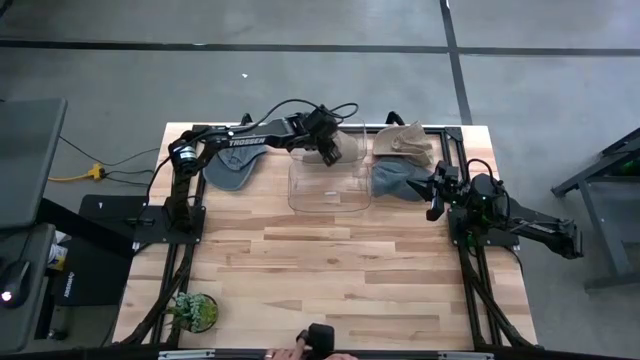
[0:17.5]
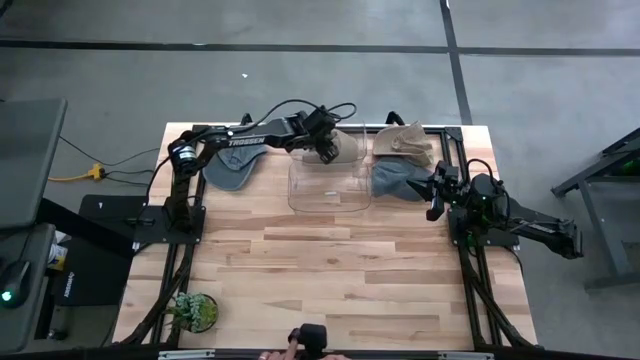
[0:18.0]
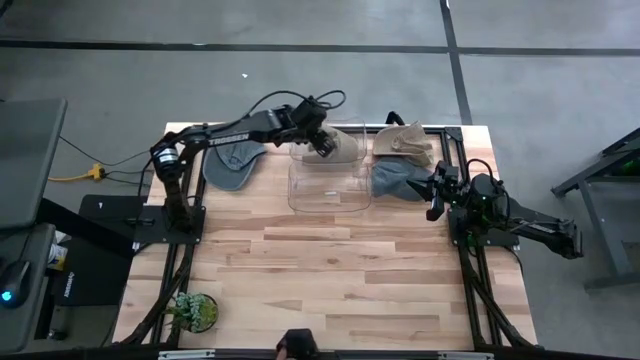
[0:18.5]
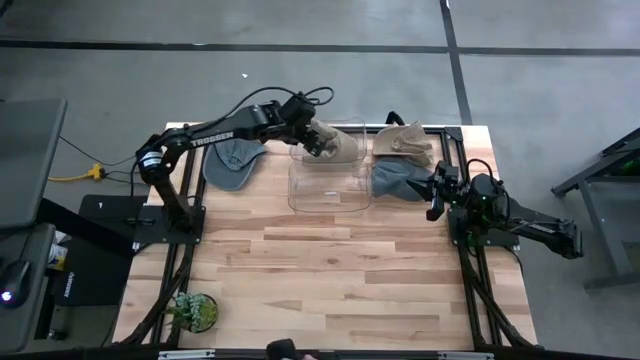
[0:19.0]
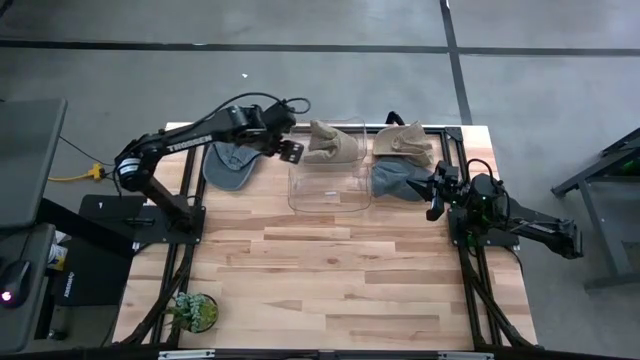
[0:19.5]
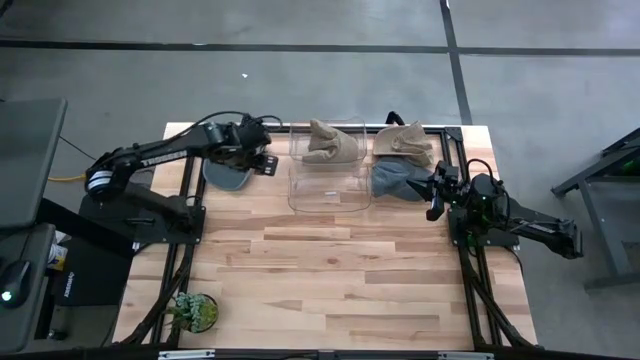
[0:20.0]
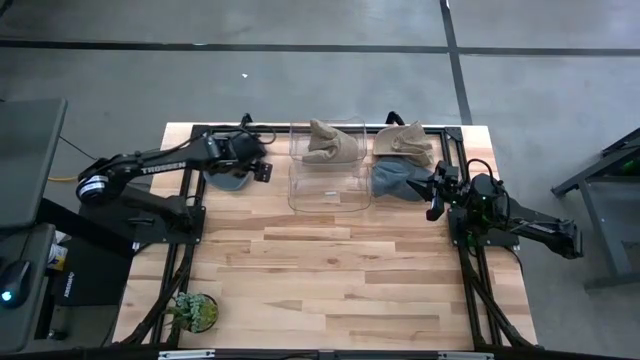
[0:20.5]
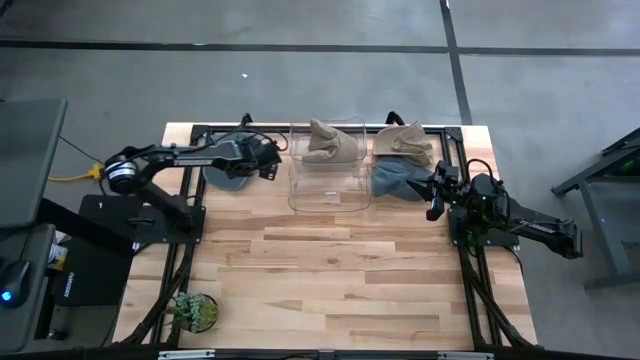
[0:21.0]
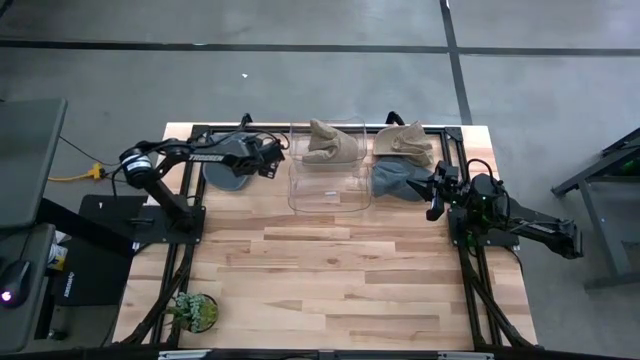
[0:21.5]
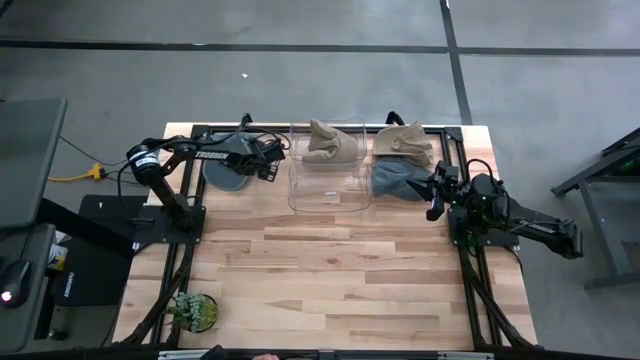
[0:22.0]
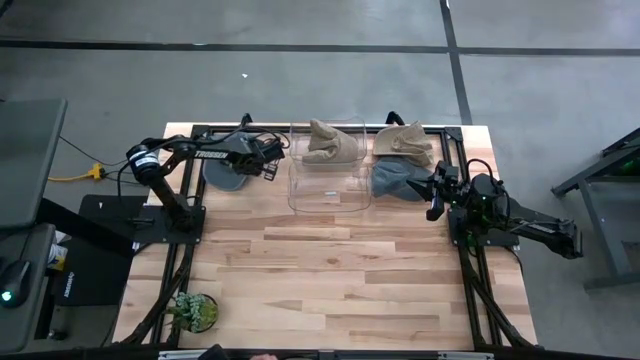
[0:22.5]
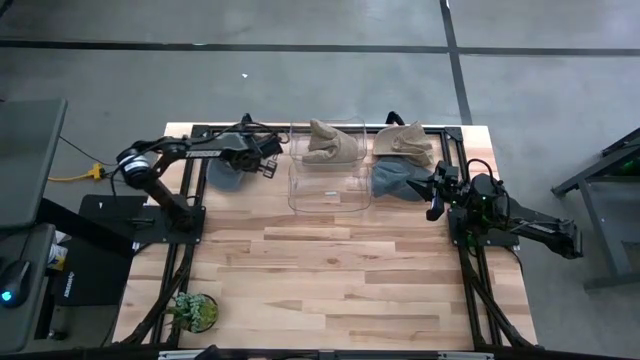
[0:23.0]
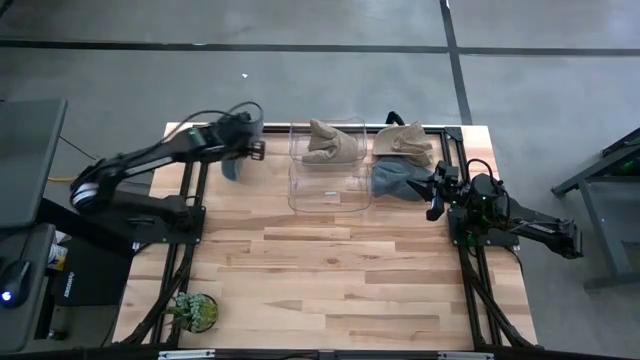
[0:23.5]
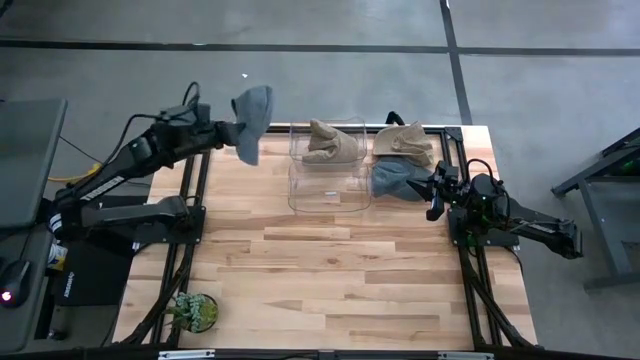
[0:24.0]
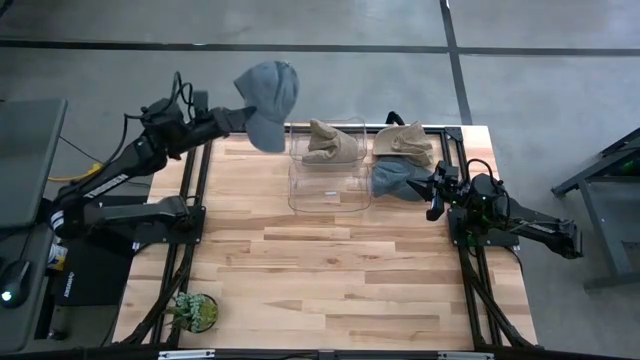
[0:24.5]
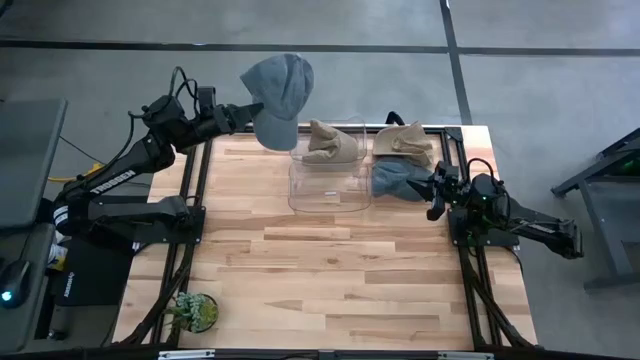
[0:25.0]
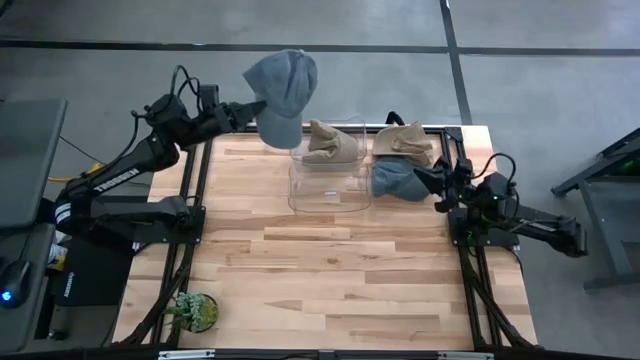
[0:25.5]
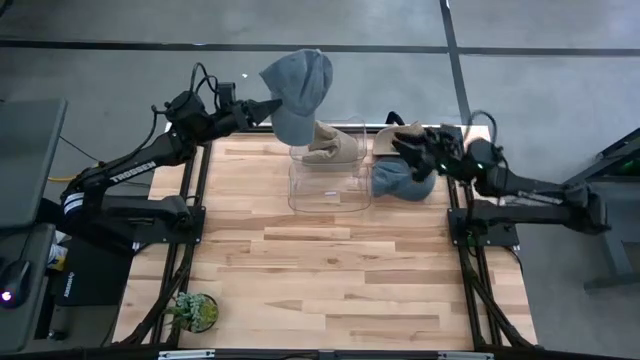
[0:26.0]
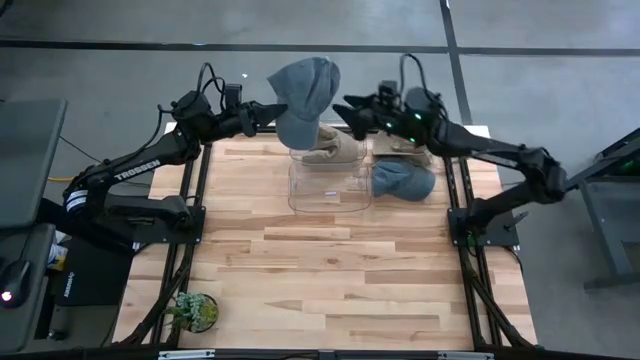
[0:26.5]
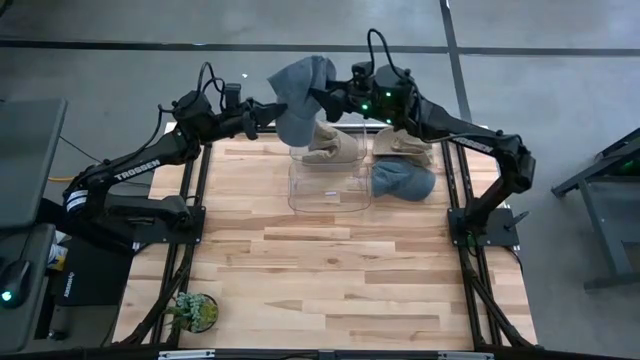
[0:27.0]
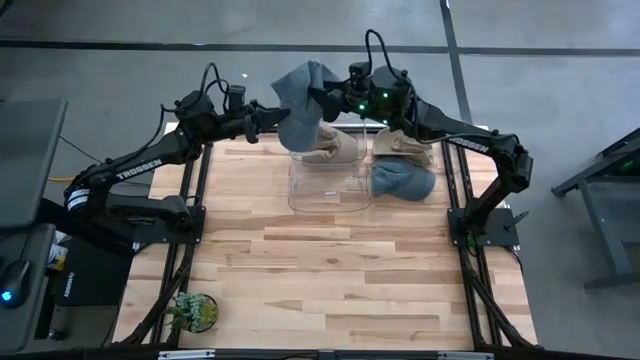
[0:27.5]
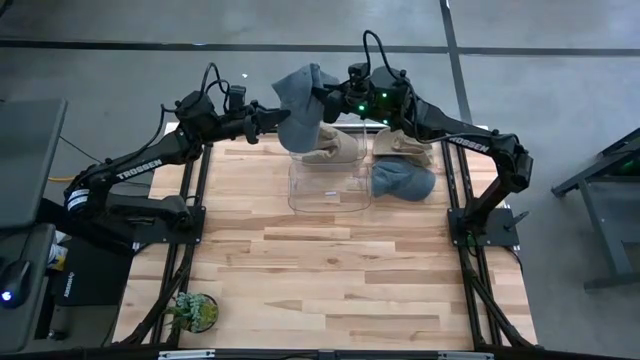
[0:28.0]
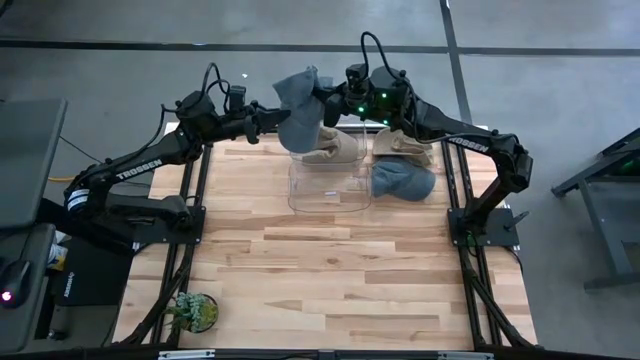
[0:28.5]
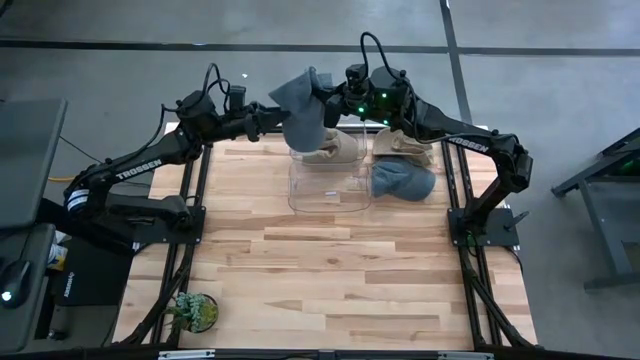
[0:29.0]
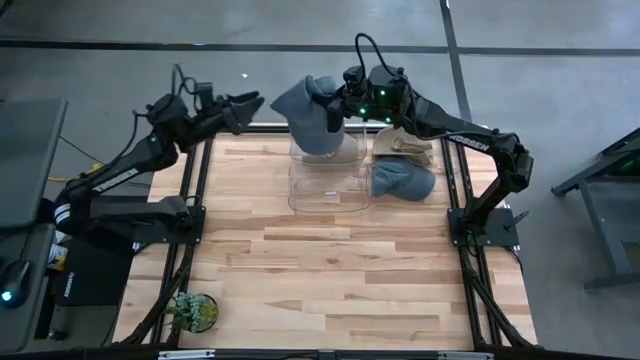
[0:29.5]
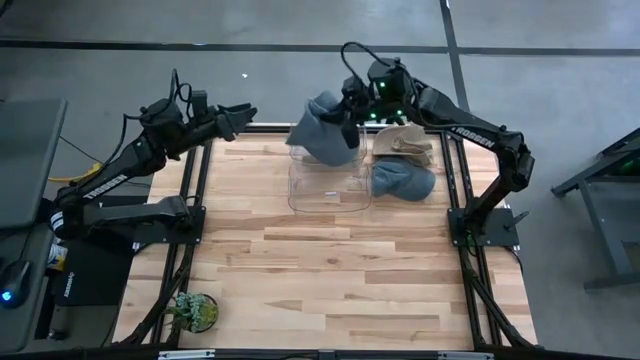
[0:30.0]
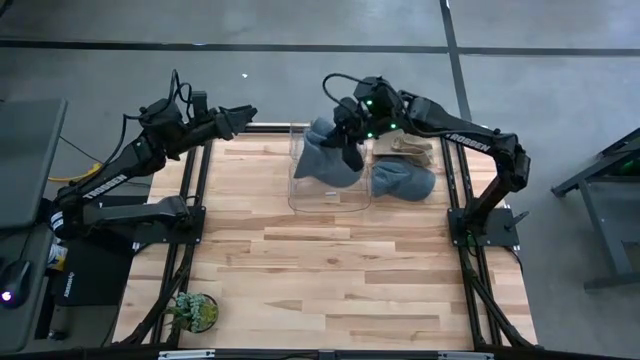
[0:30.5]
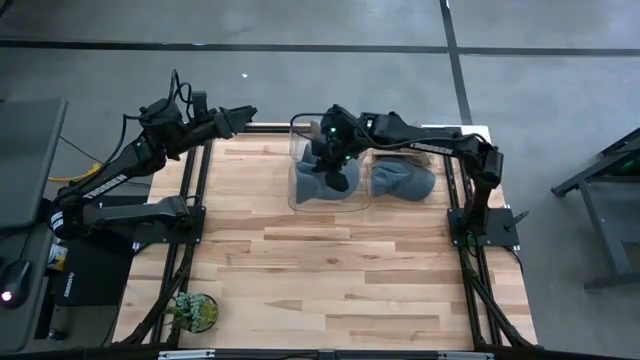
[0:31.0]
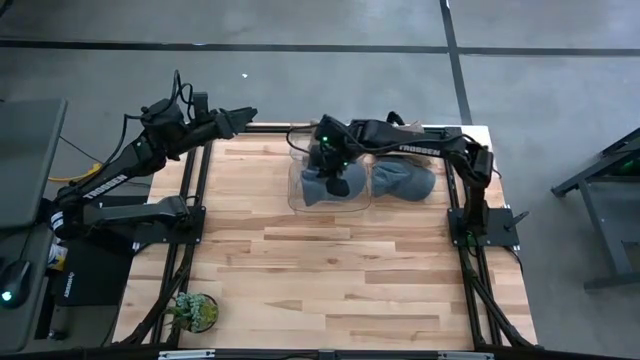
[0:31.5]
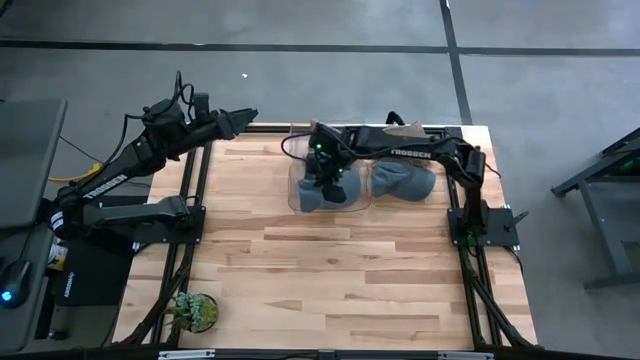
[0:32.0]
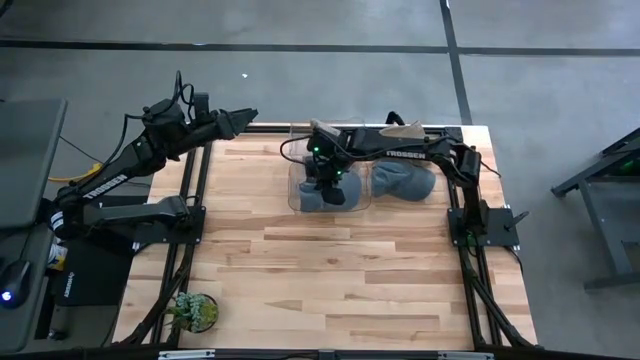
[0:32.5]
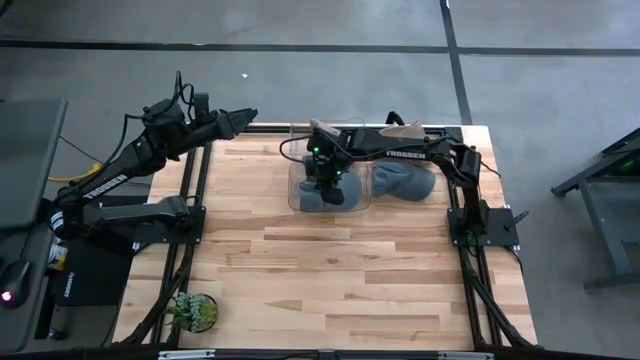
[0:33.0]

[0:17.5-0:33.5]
Task: Pick & Place hat
Put the left blue cap into the bottom transparent bin

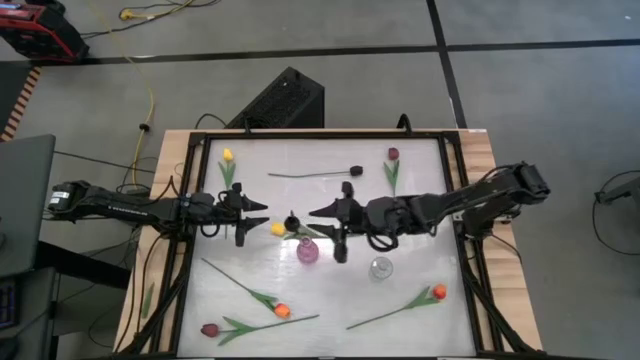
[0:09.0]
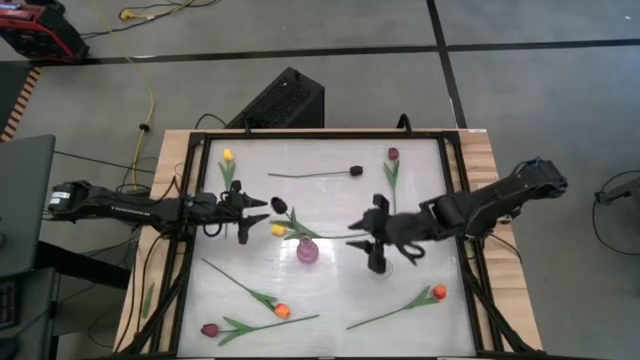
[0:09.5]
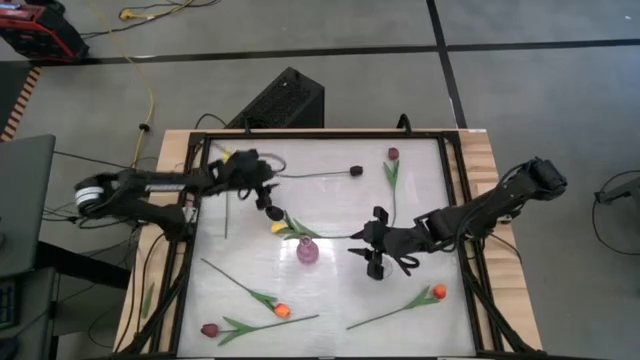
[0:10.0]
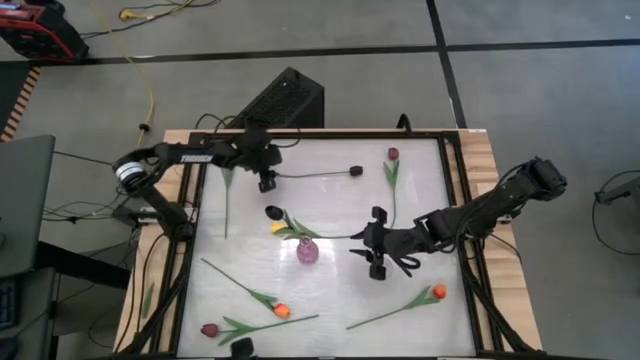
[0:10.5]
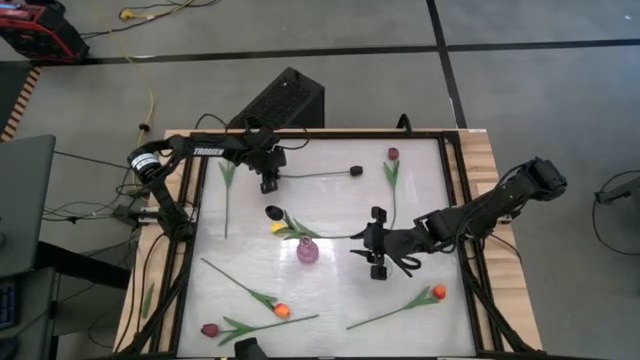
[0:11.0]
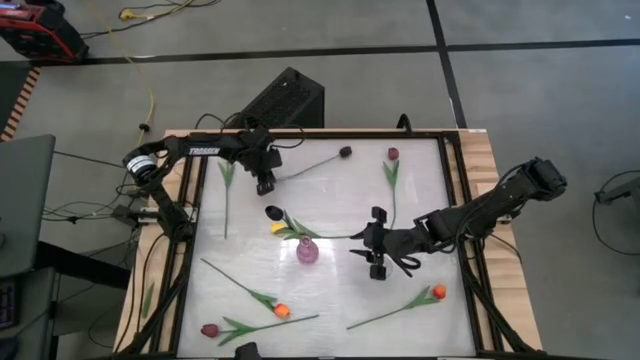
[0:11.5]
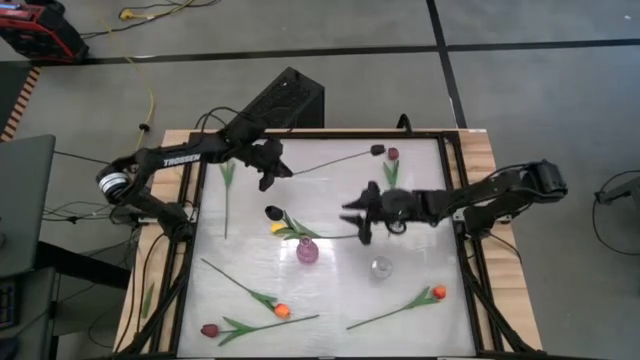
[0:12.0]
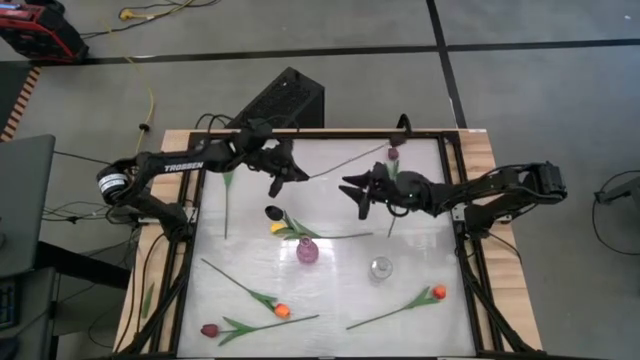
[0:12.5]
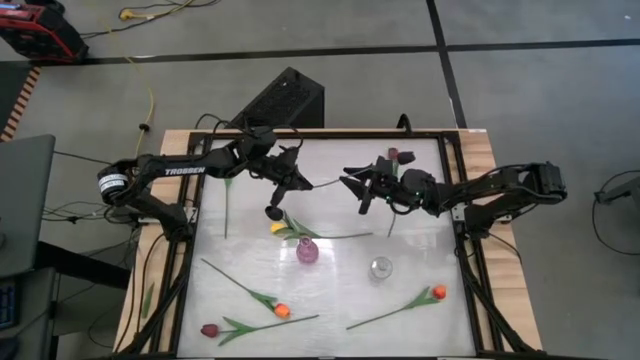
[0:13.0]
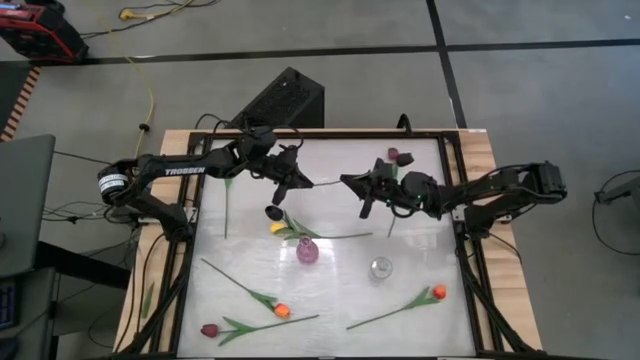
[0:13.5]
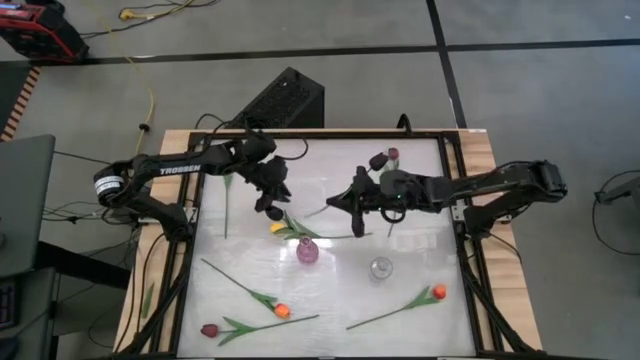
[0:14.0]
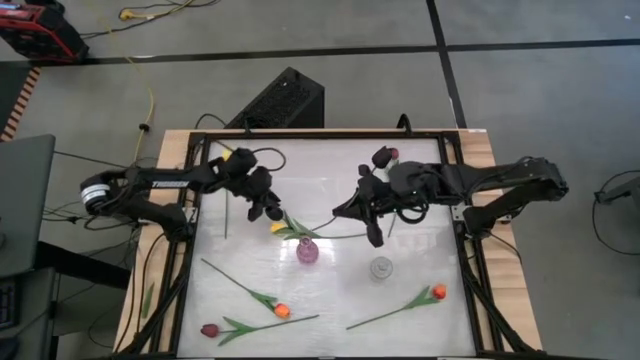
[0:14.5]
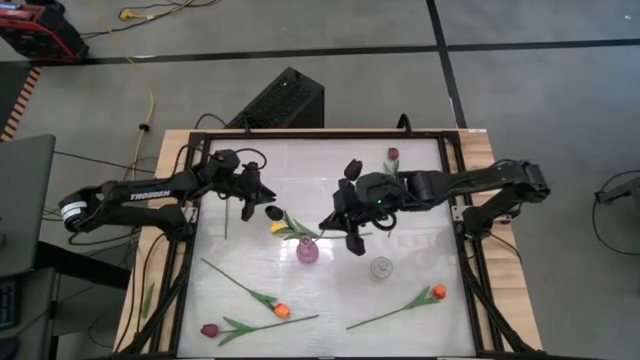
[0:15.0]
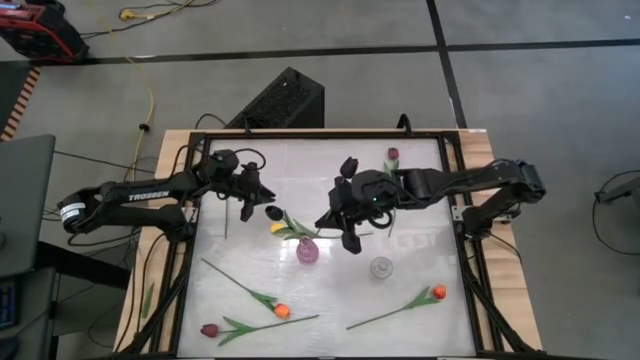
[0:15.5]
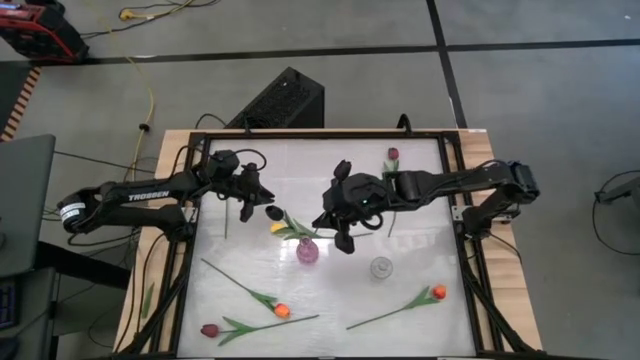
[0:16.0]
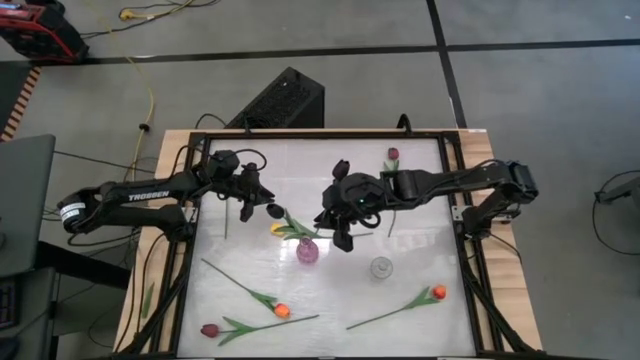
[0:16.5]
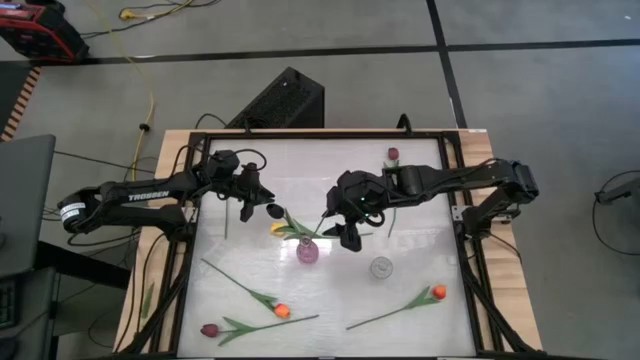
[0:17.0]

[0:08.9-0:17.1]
Task: Sort flowers into vase by color
Put the black flower into the pink vase
